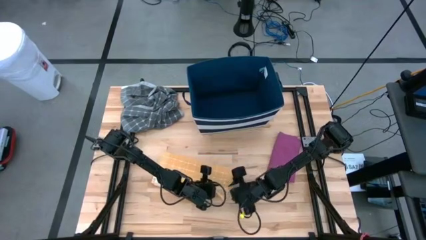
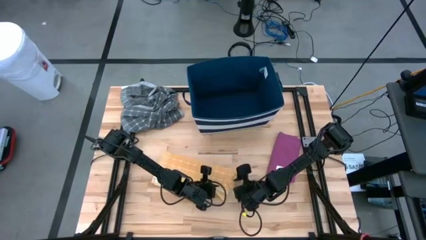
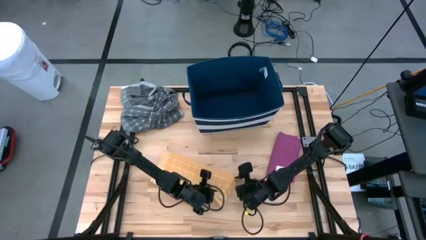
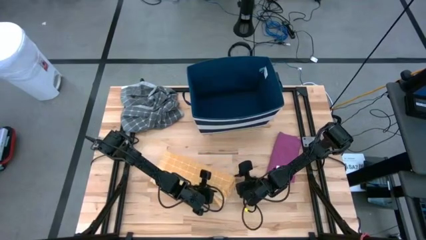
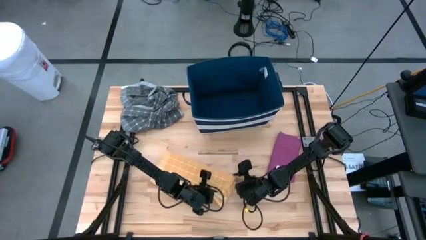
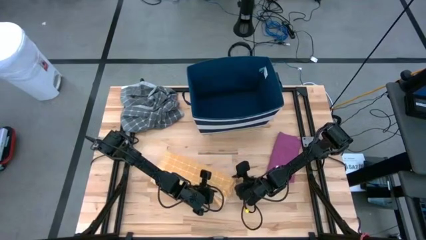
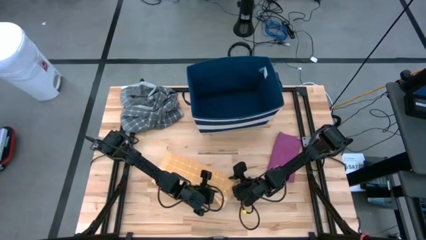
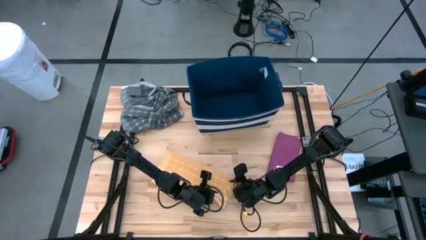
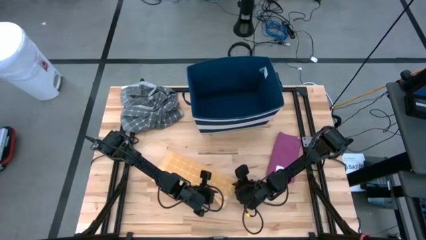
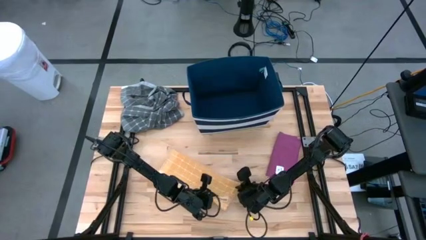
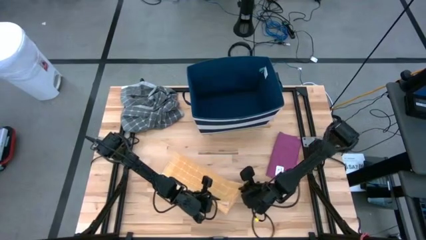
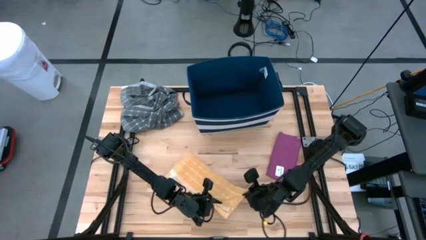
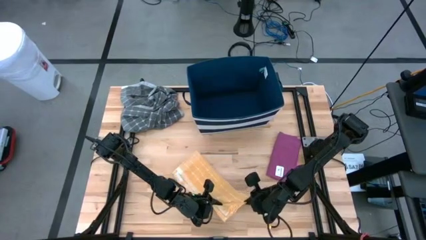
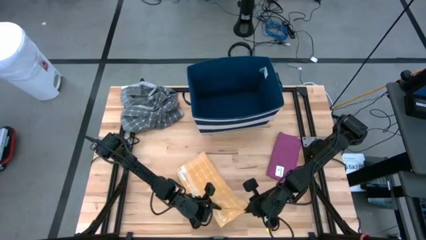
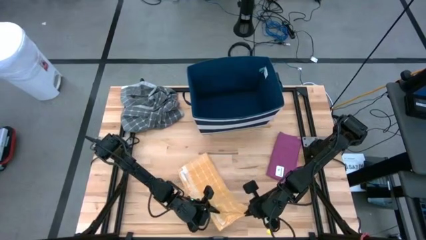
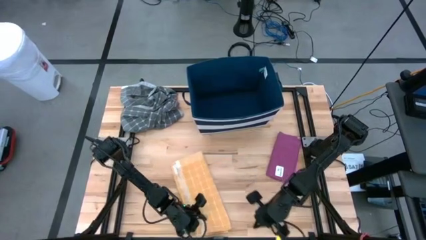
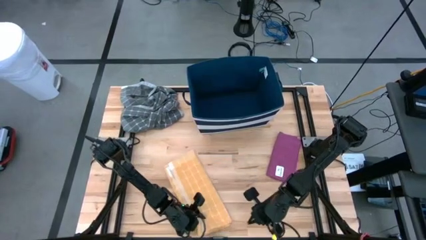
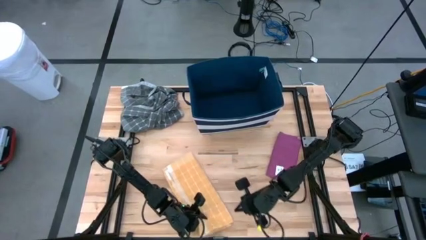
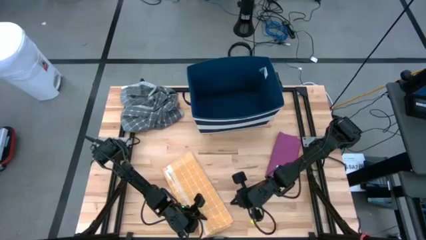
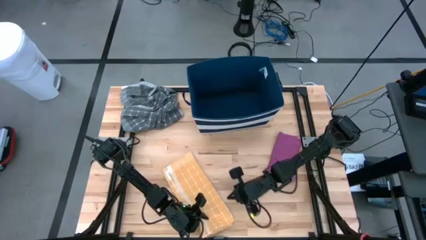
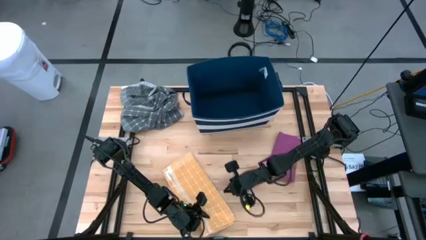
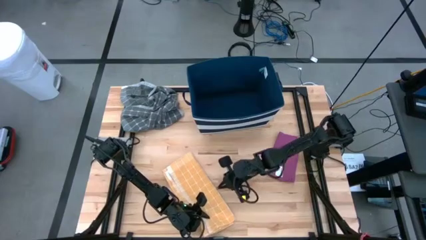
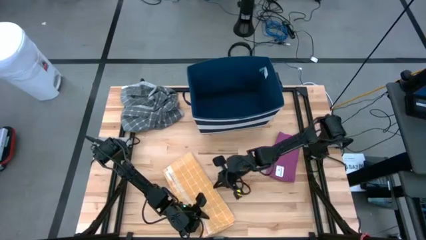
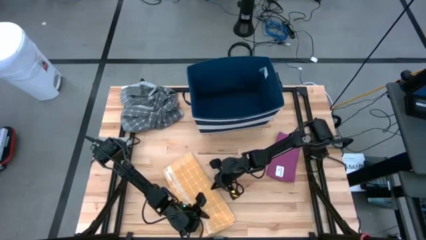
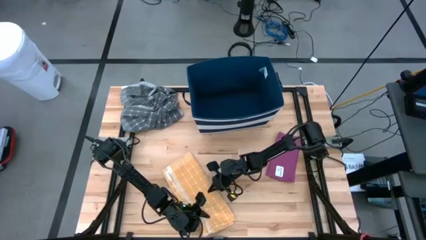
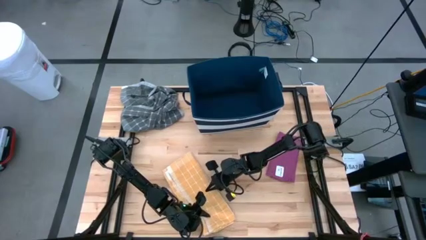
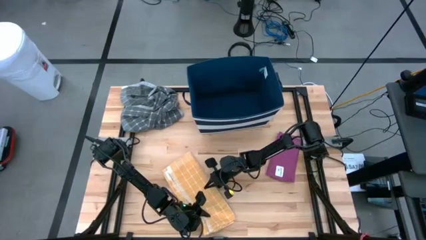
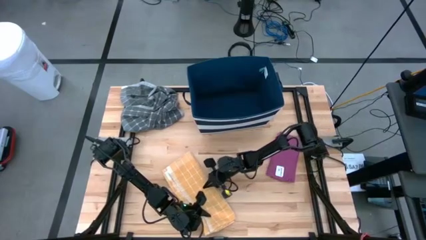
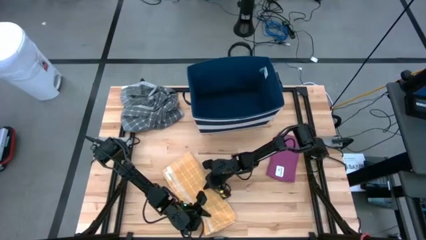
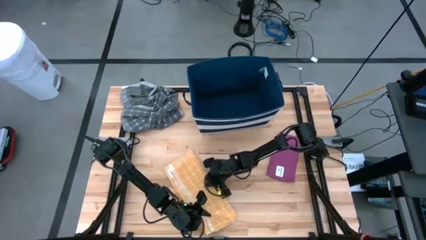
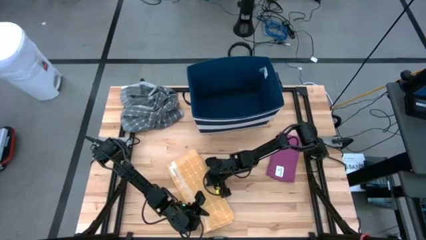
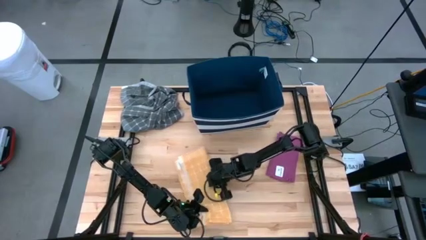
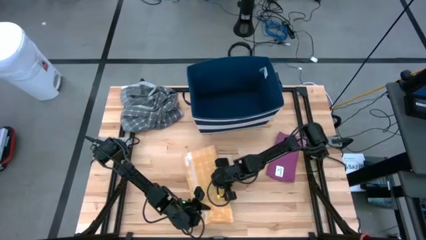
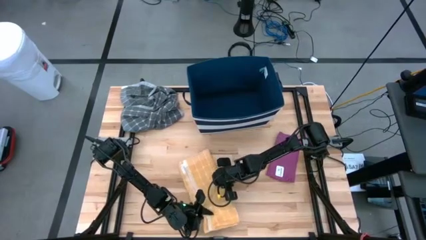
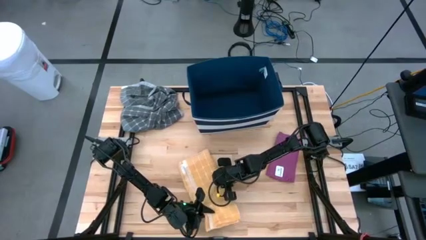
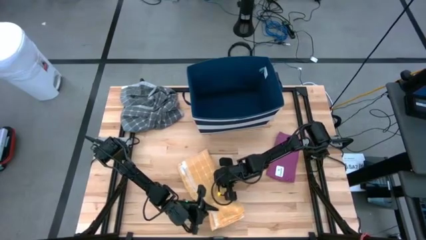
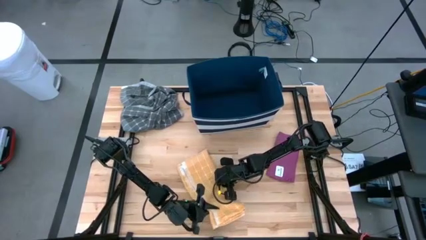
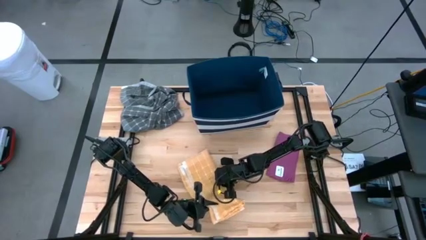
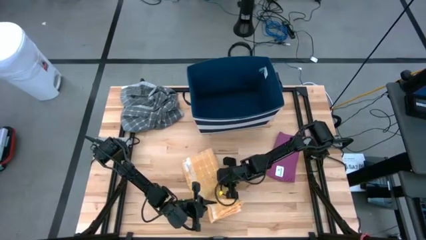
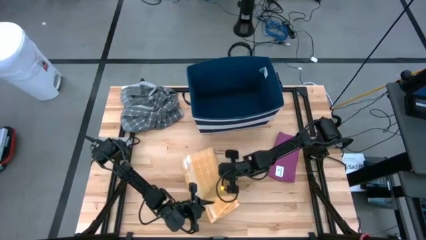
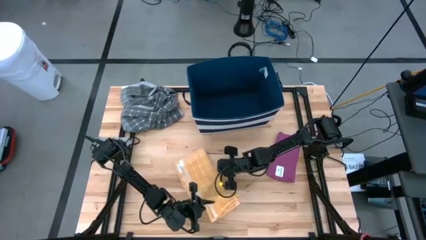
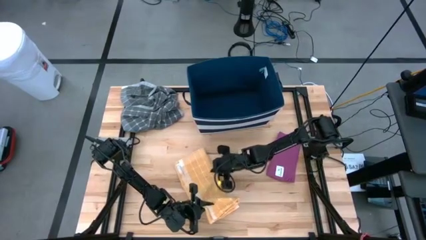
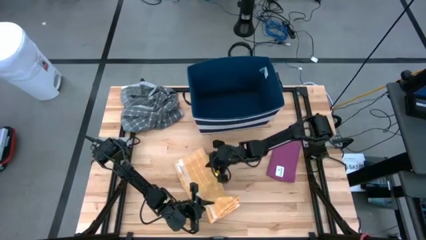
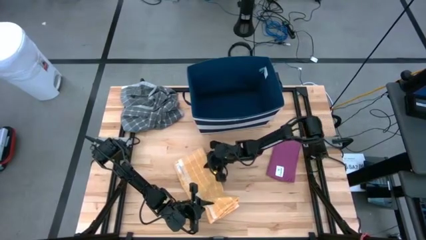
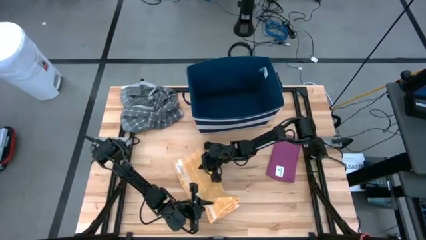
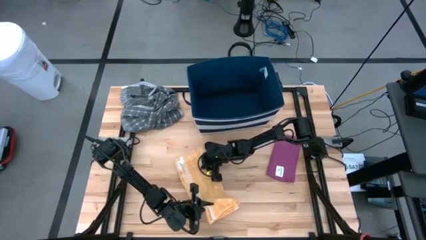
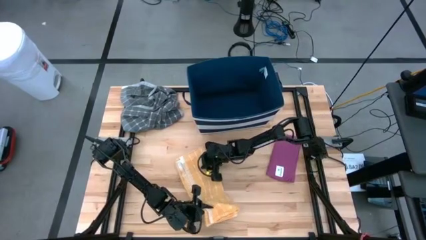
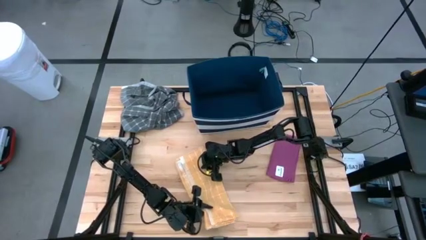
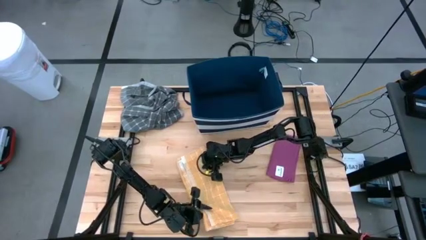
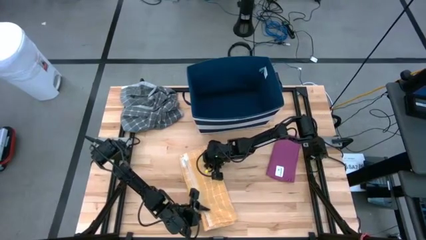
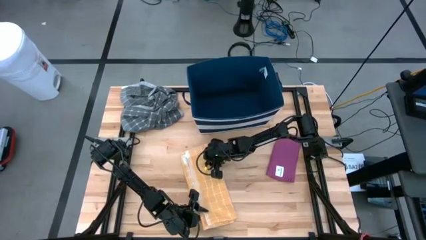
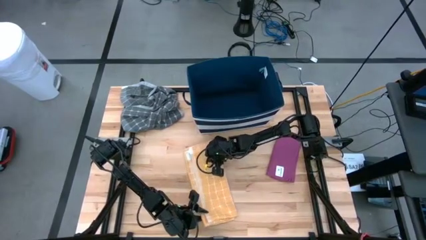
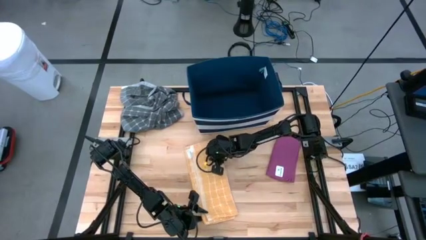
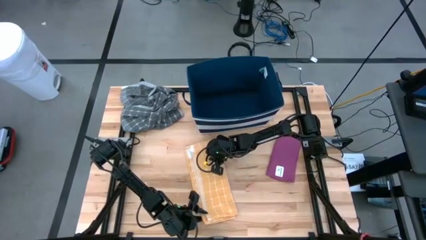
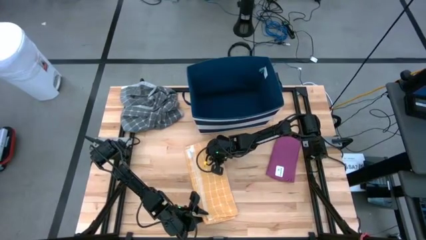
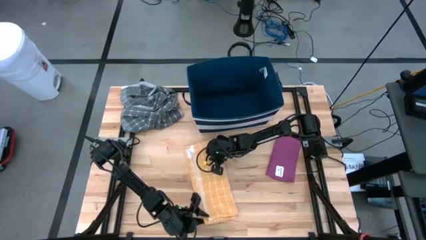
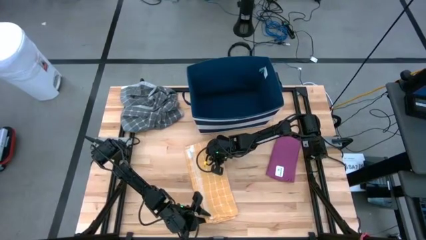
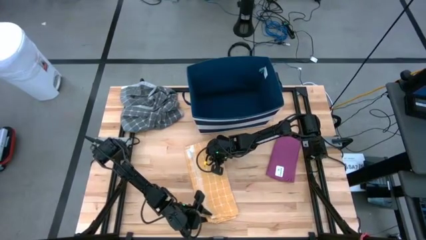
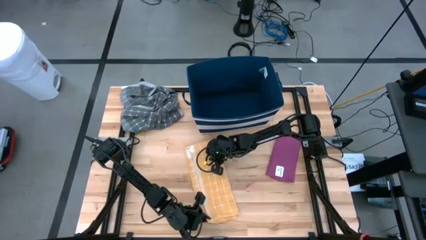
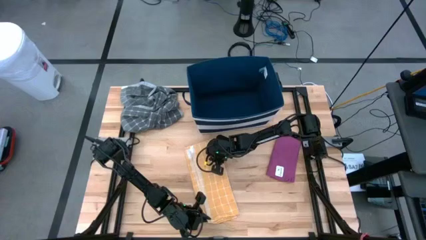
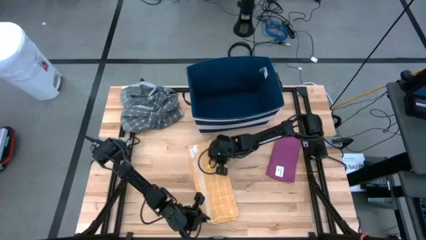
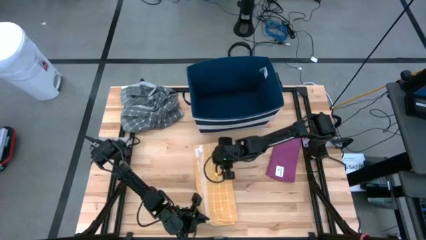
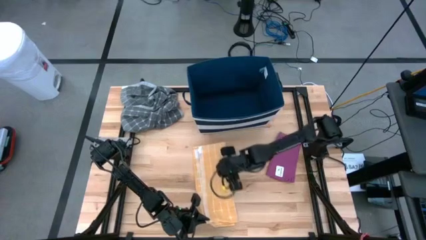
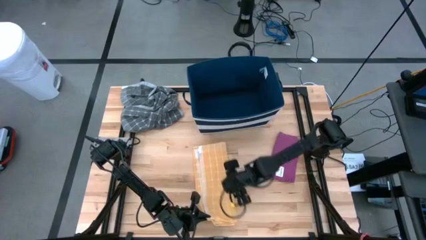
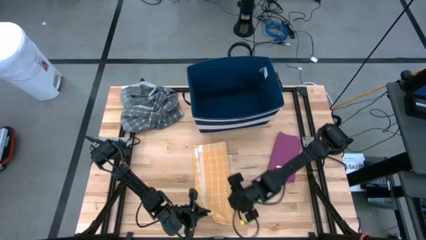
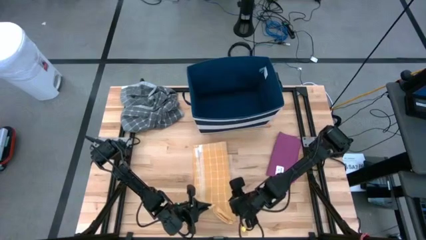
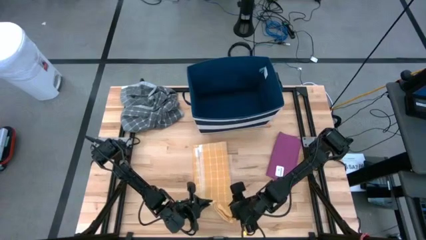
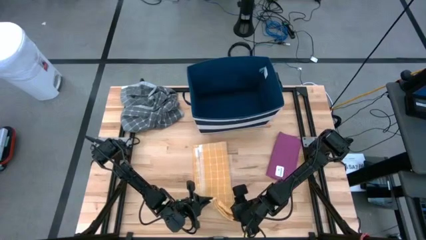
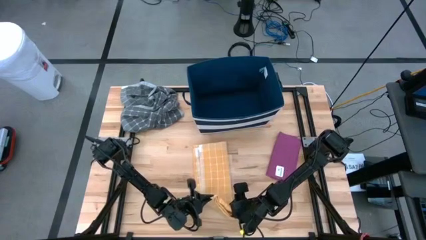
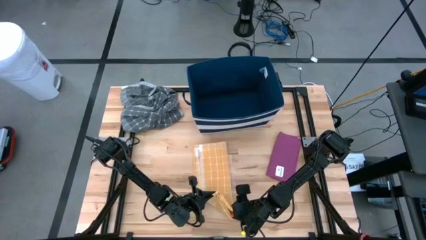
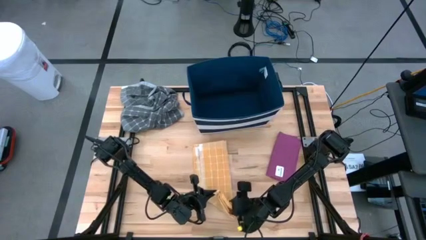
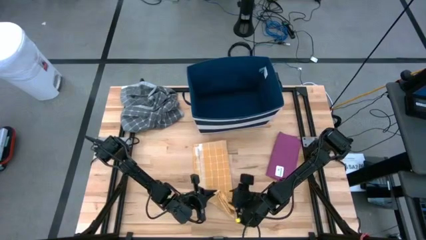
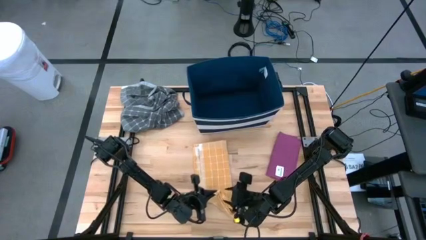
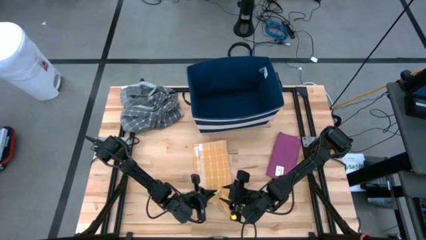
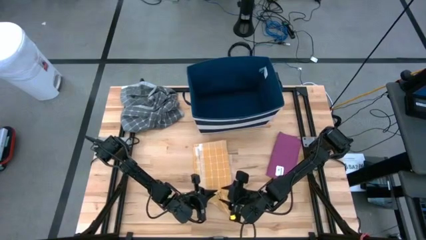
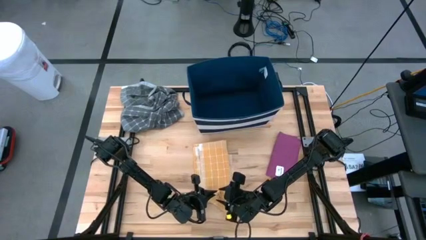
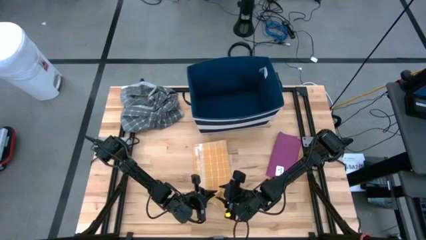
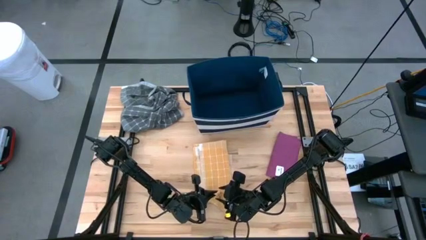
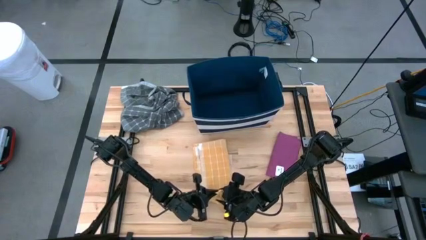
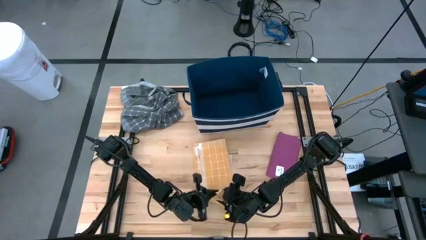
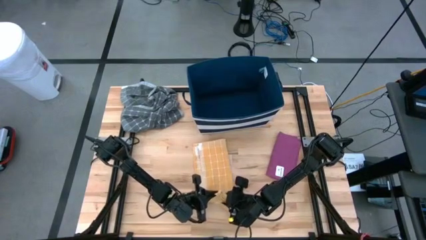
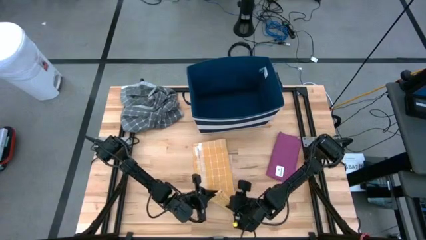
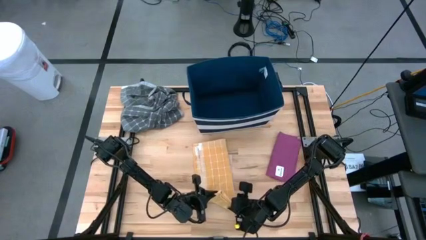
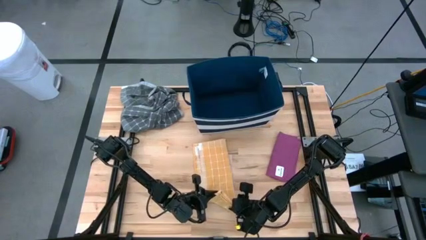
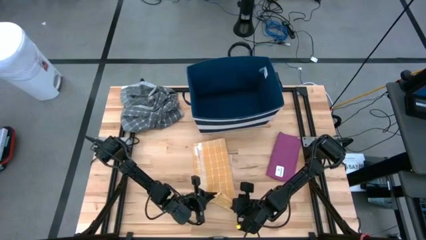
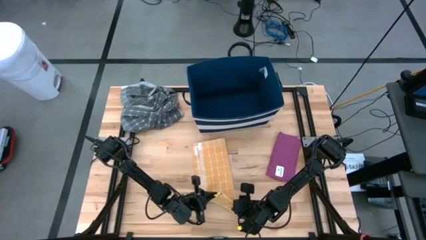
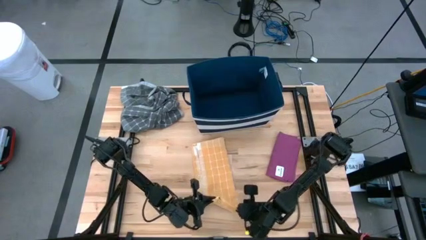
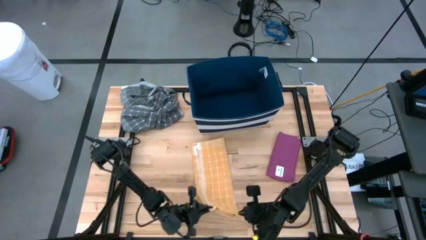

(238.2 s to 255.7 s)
Task: Fold towel
Fold the yellow towel
